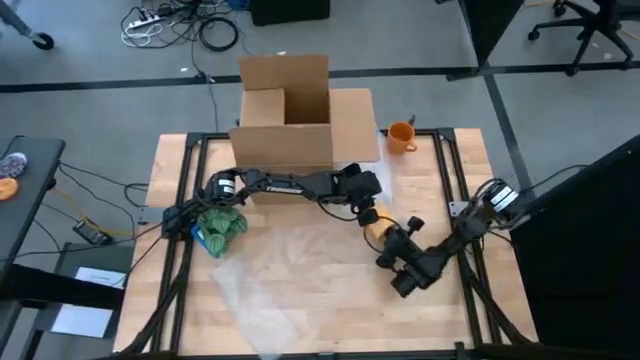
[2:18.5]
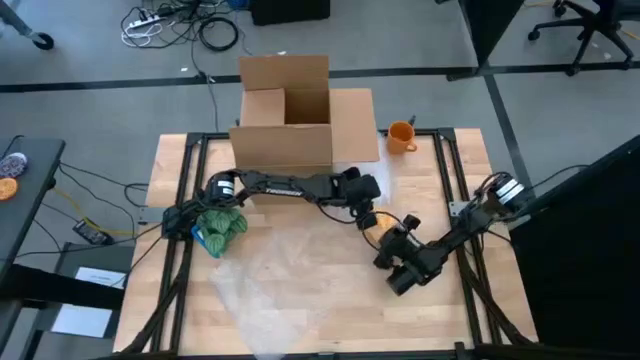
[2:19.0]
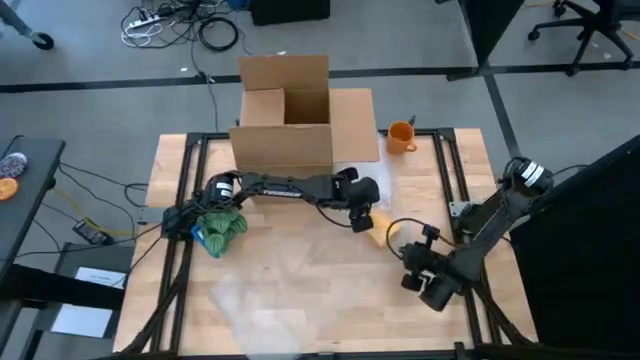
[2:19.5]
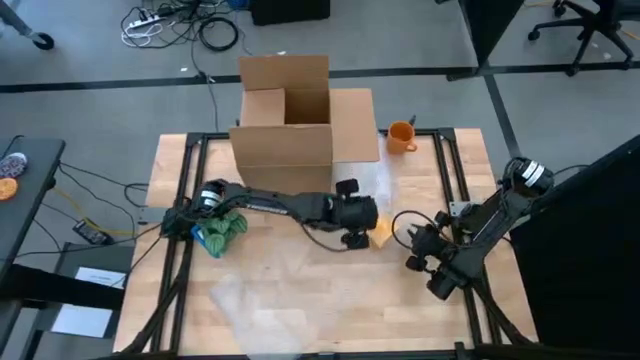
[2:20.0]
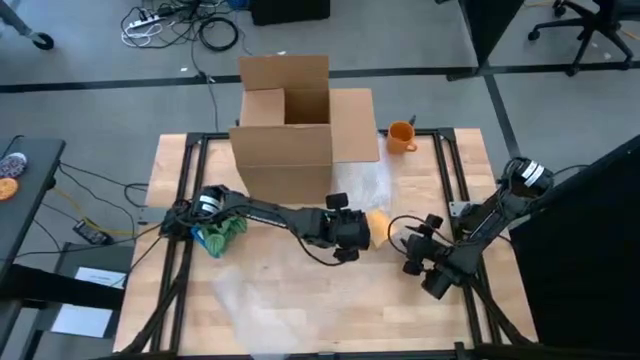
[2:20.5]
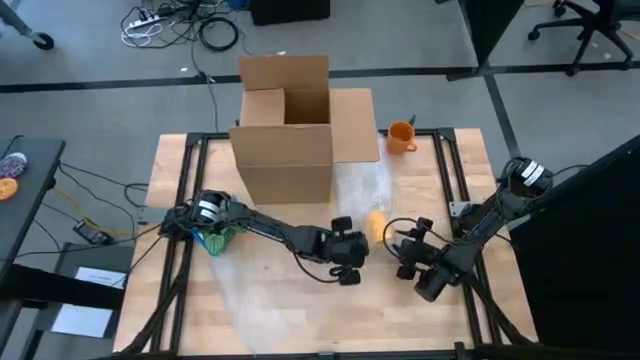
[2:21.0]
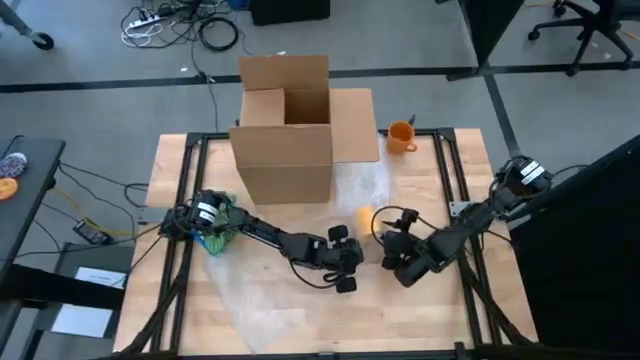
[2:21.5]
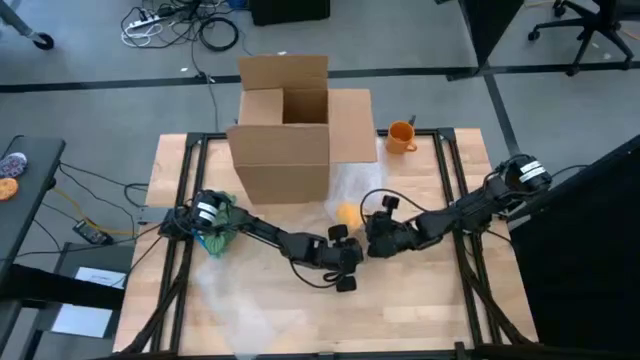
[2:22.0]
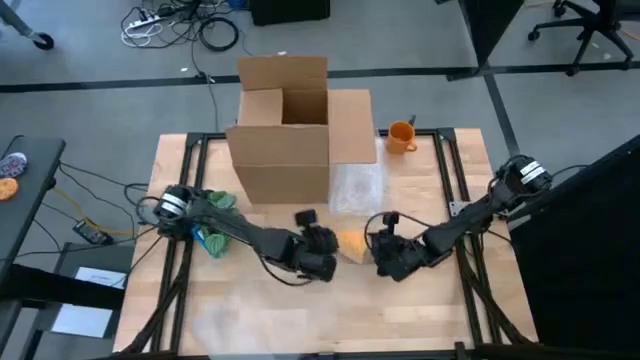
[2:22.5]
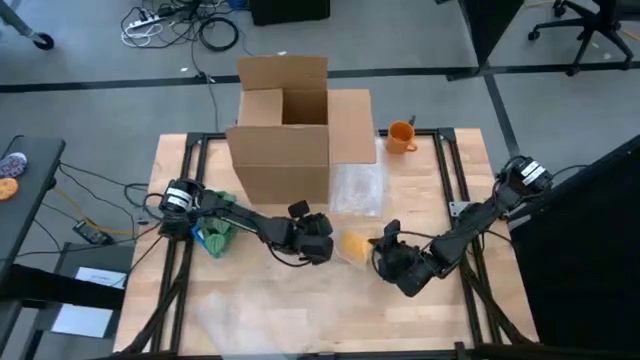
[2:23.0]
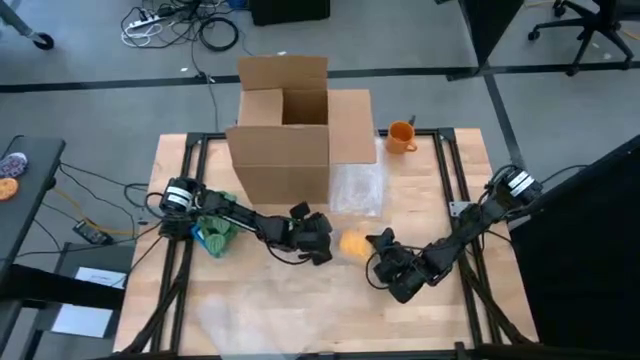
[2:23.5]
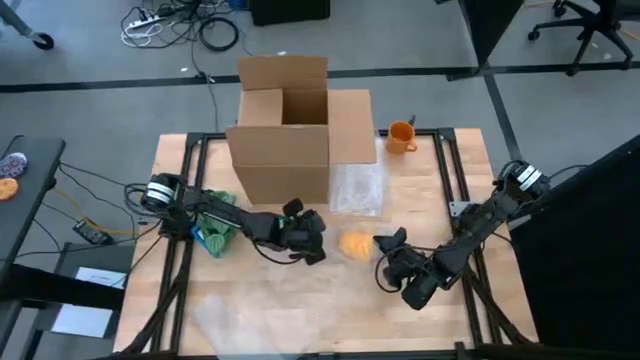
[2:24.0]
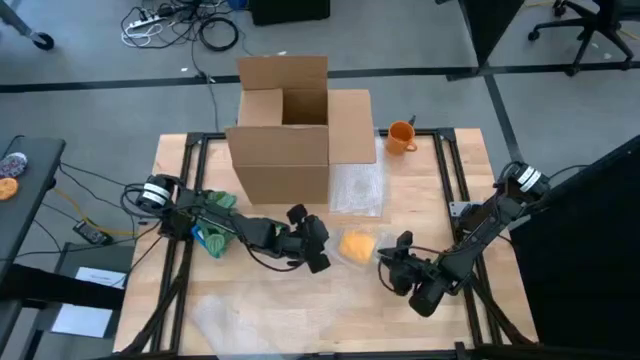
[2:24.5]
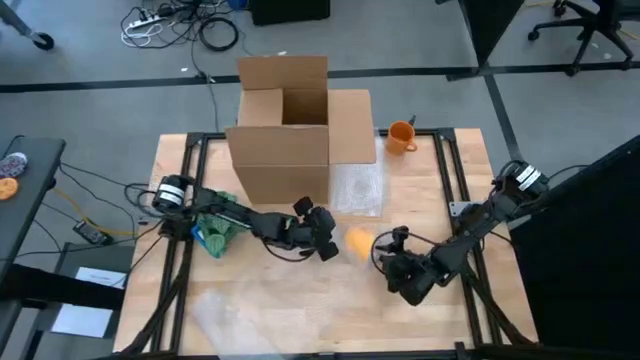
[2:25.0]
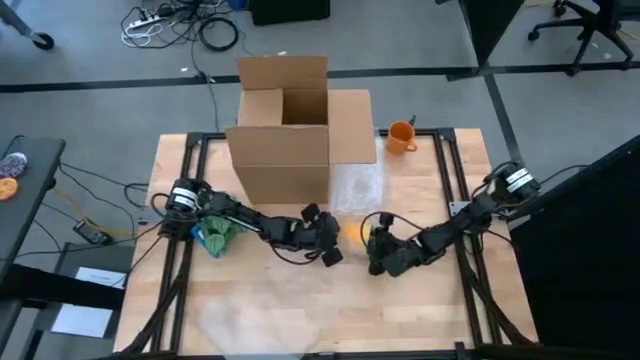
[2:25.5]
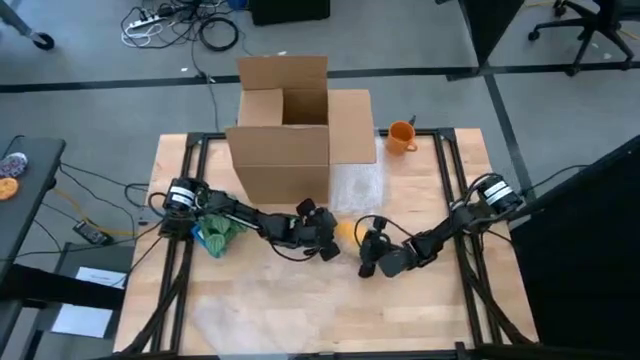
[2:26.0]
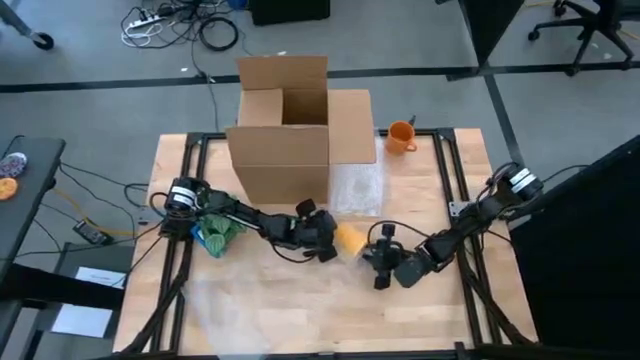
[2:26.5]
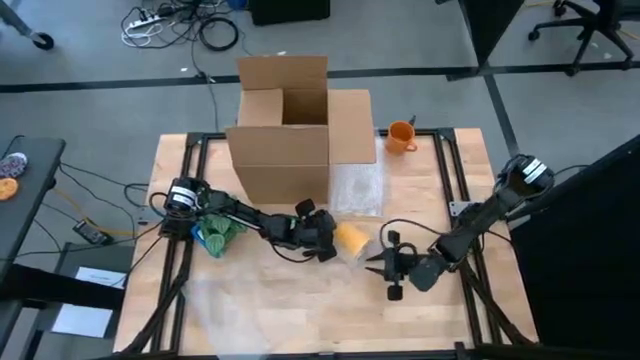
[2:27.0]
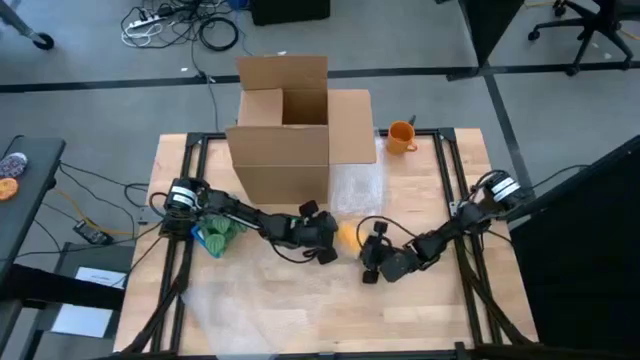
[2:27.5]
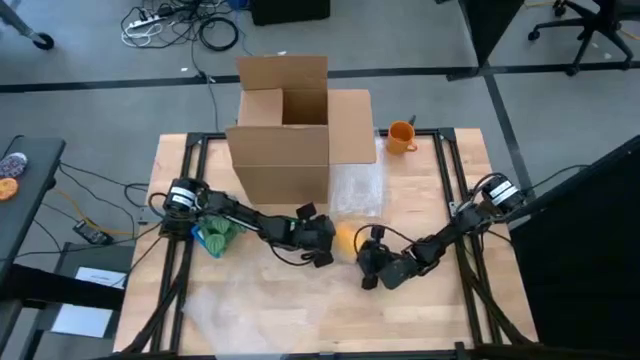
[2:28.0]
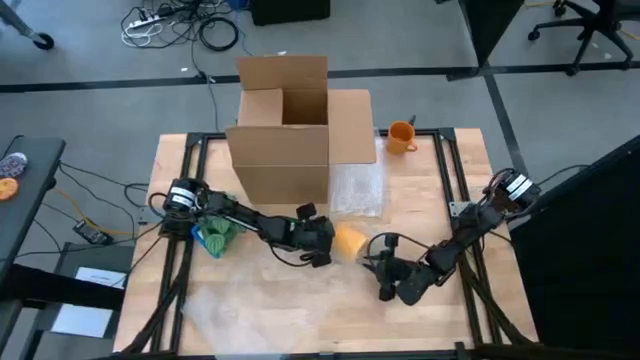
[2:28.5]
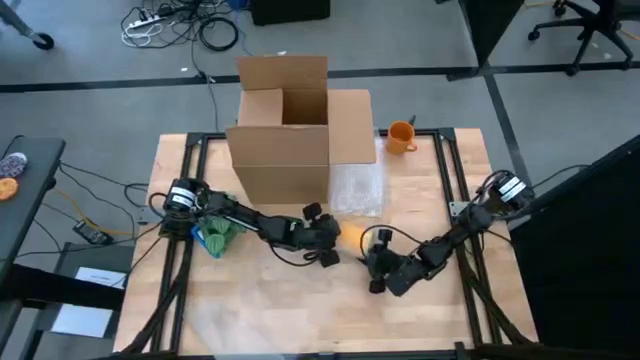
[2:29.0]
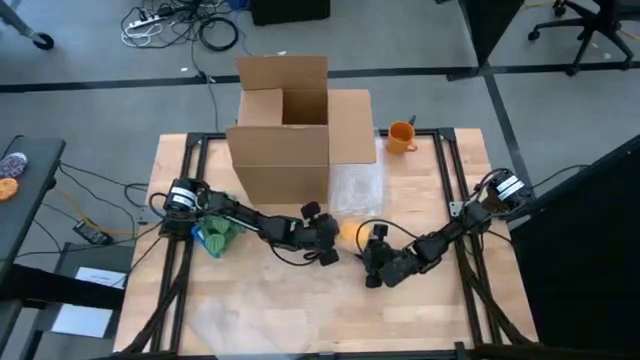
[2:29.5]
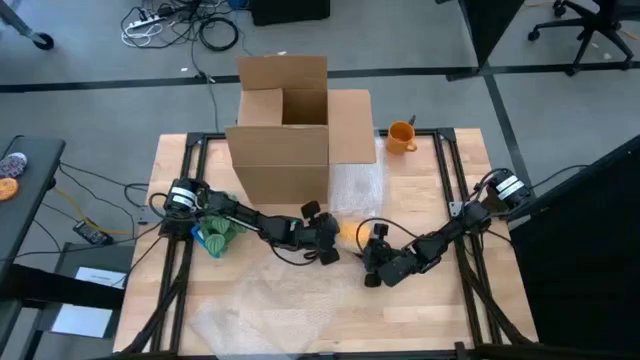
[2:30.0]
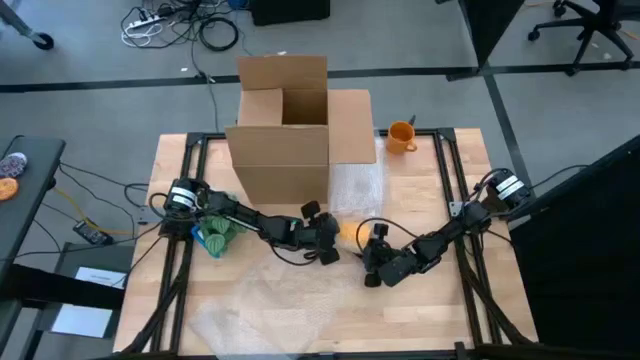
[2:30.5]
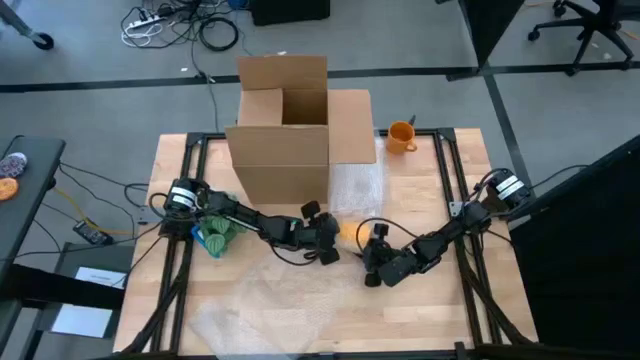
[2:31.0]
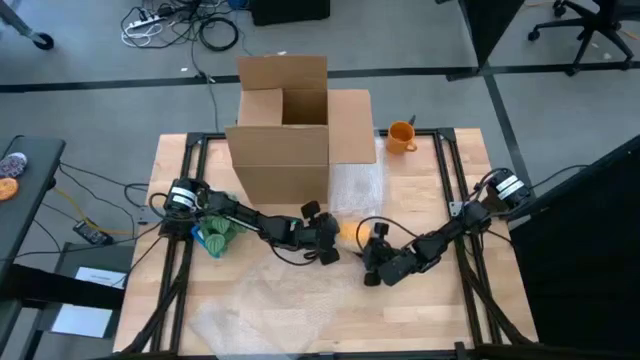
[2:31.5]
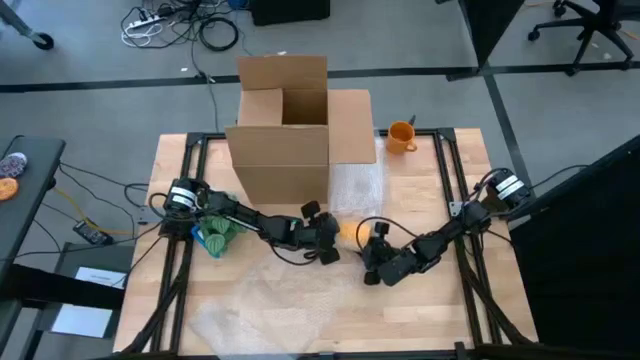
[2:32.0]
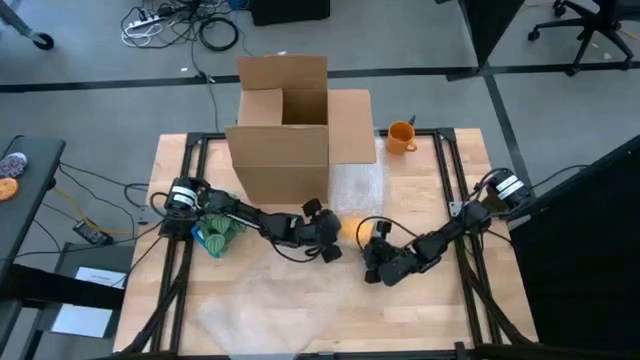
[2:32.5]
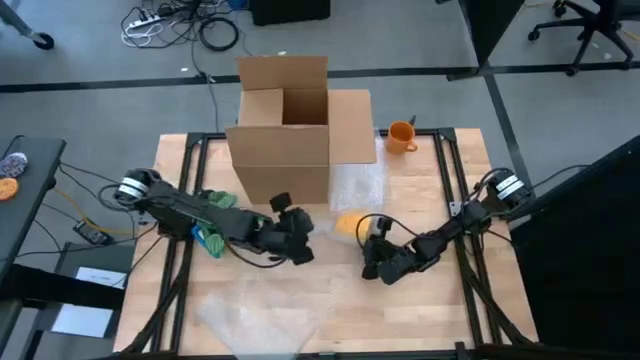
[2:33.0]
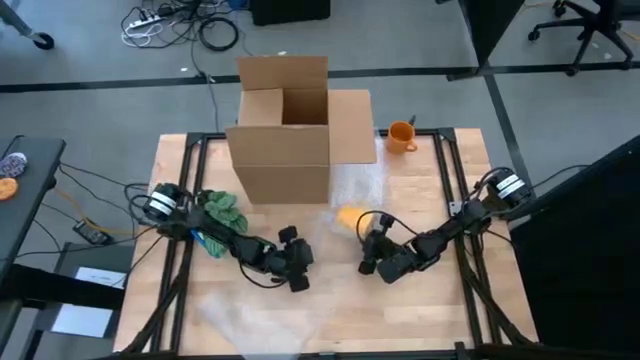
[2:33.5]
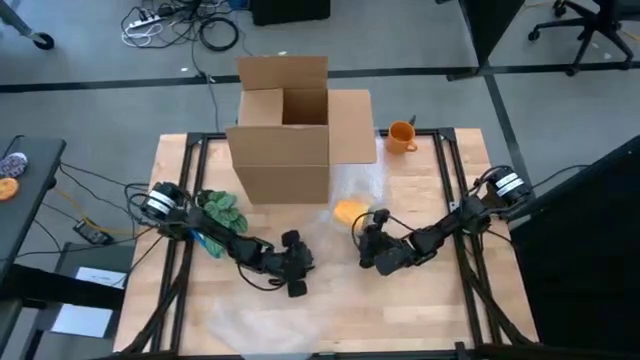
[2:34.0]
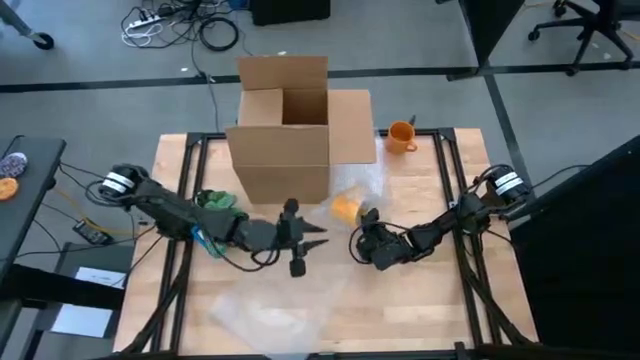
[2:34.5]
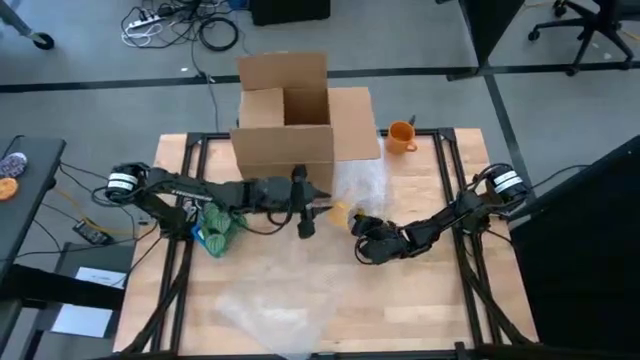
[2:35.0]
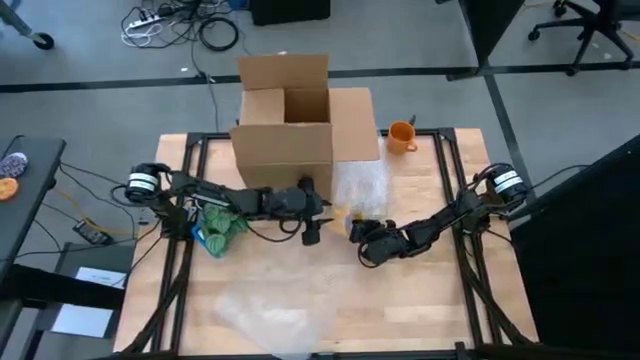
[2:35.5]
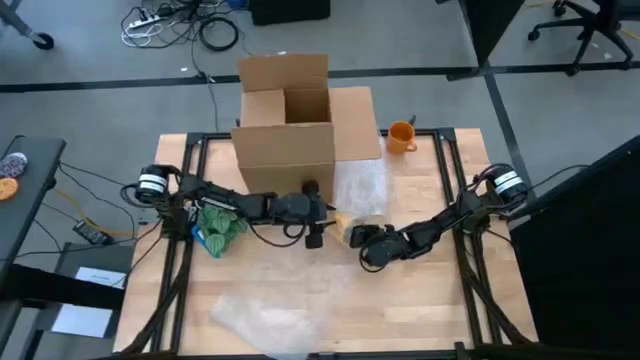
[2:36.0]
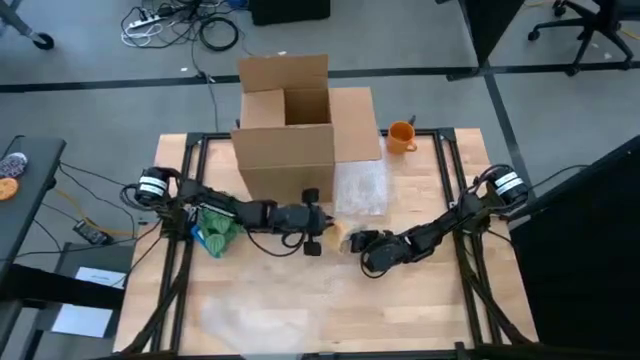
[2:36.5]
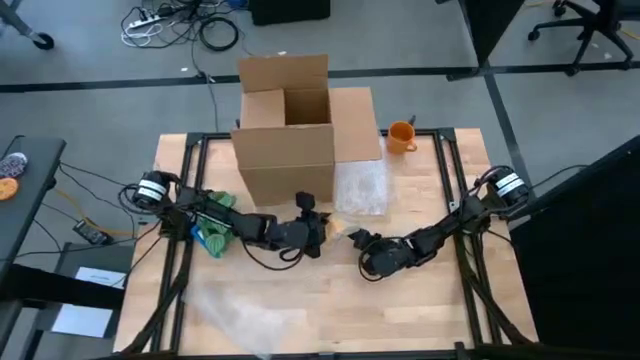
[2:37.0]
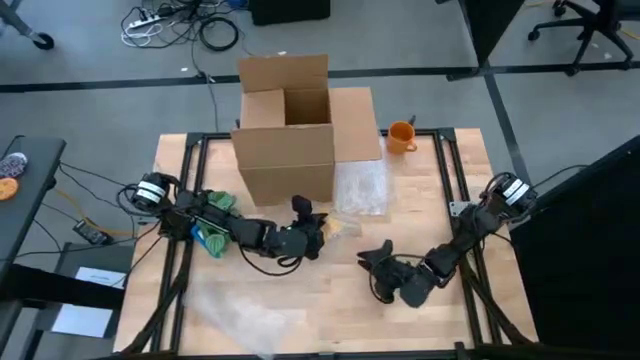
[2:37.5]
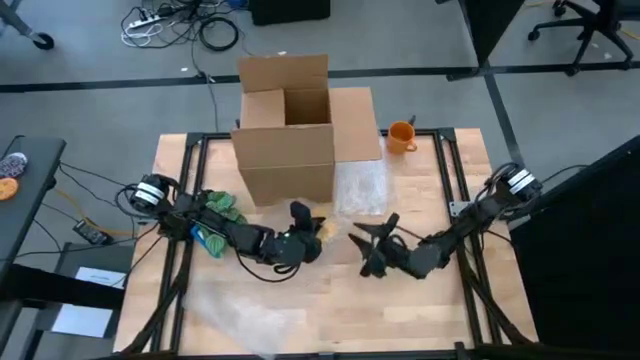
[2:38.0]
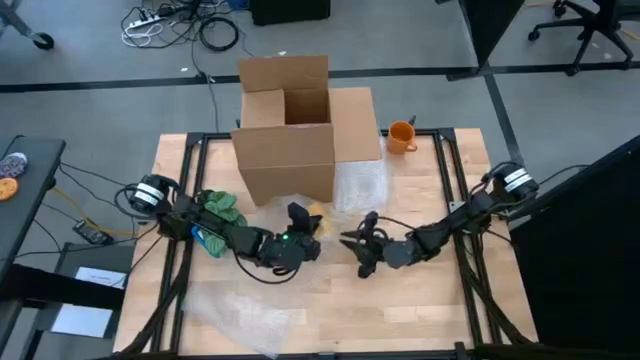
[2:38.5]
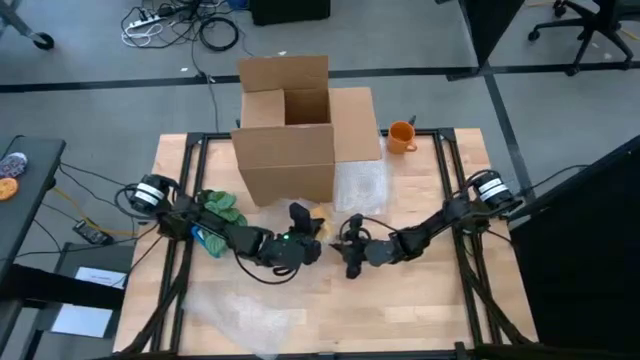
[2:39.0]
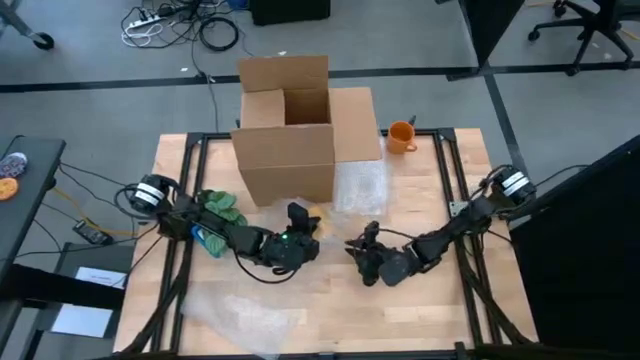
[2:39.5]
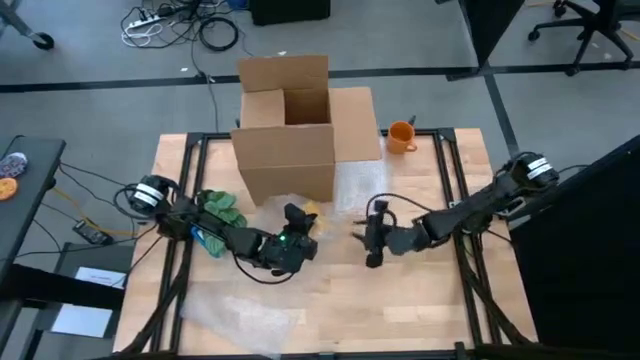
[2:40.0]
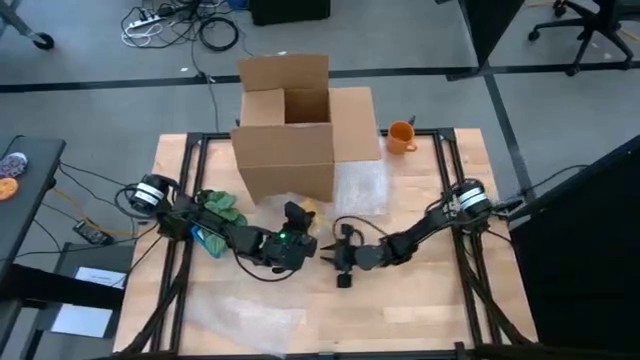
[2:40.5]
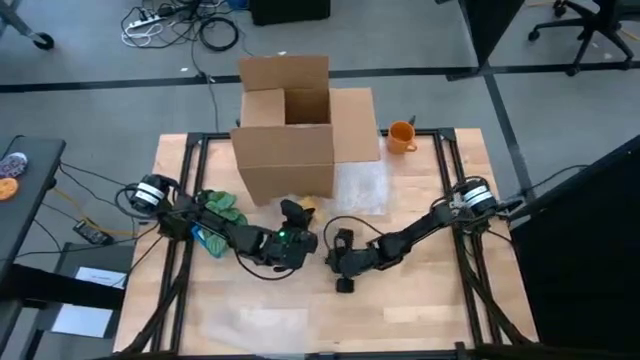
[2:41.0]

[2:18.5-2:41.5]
Task: wrap mug
Wrap the yellow mug with the bubble wrap
